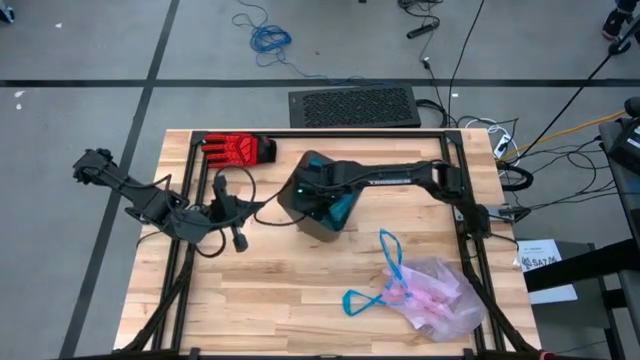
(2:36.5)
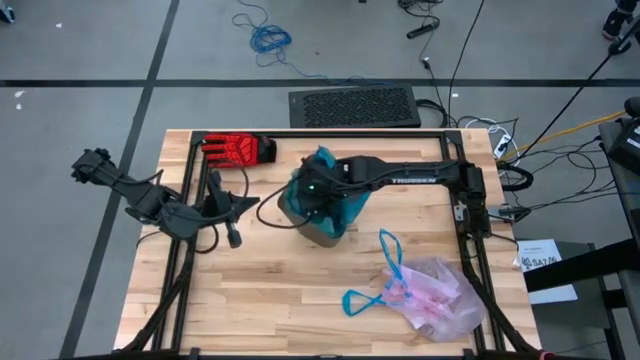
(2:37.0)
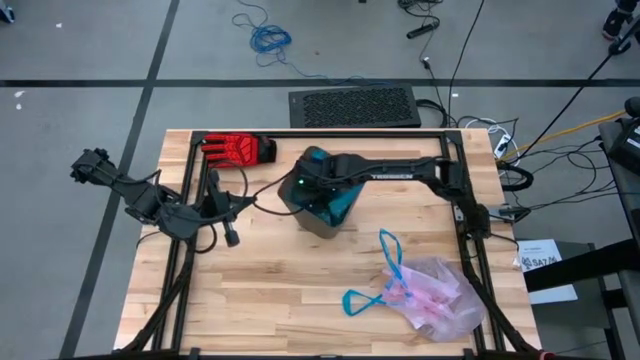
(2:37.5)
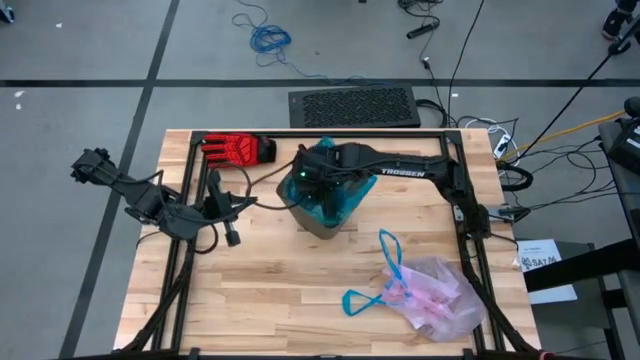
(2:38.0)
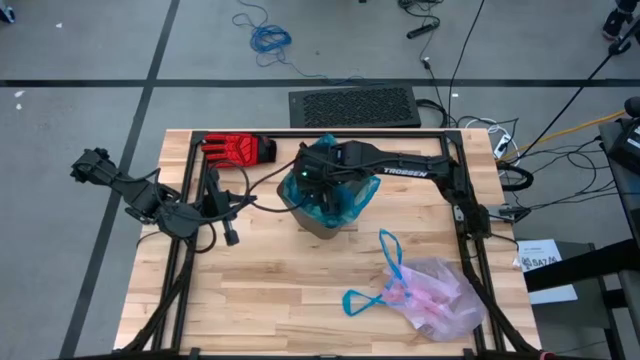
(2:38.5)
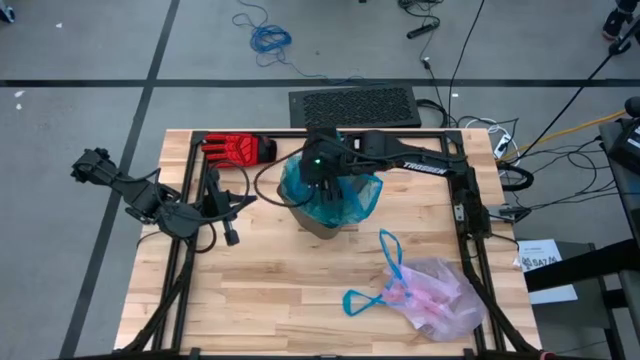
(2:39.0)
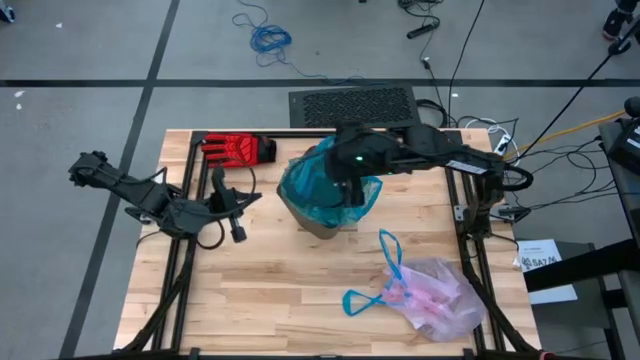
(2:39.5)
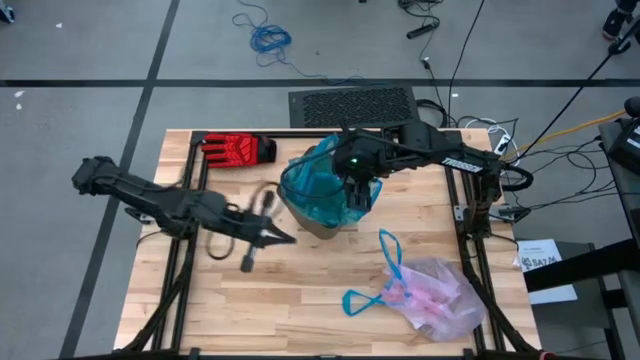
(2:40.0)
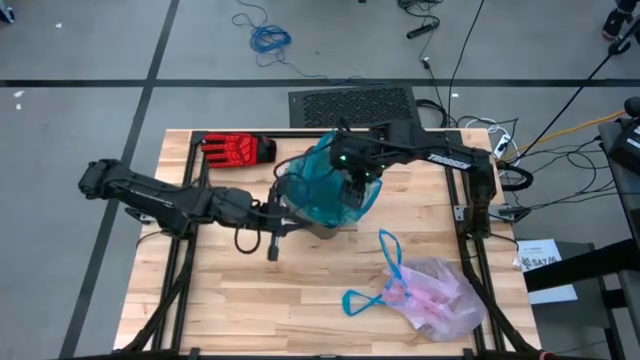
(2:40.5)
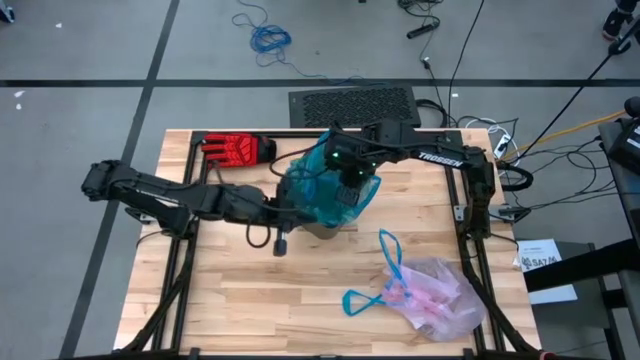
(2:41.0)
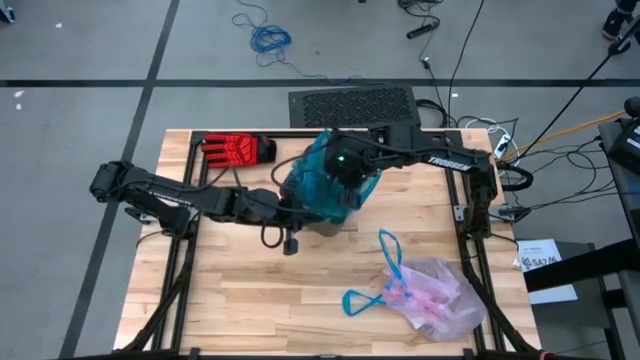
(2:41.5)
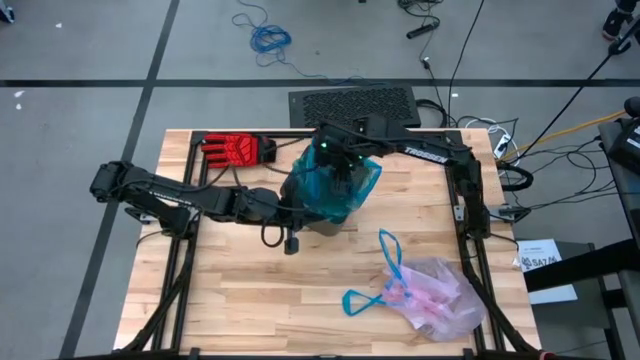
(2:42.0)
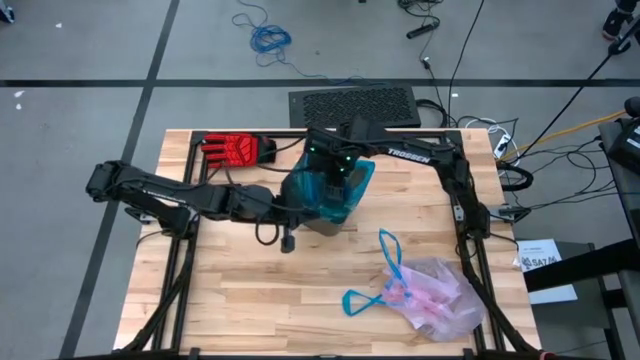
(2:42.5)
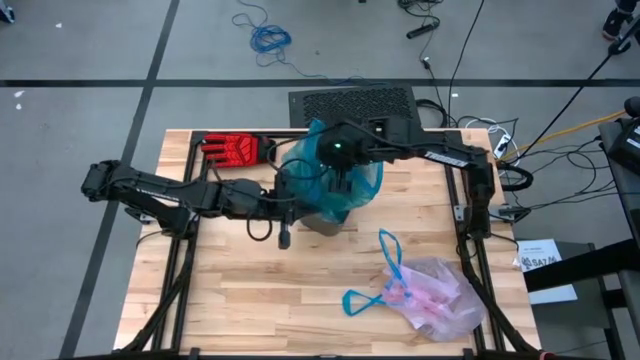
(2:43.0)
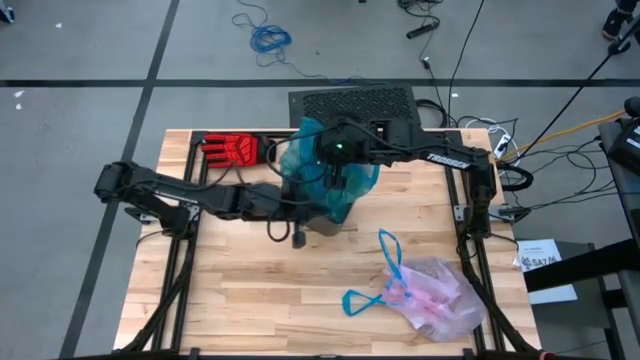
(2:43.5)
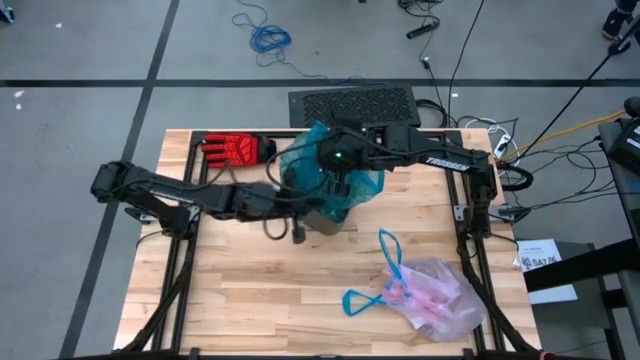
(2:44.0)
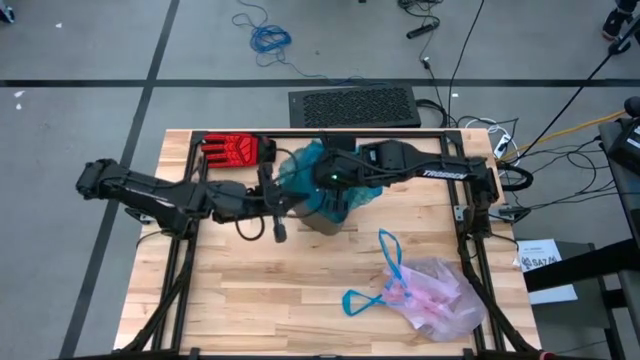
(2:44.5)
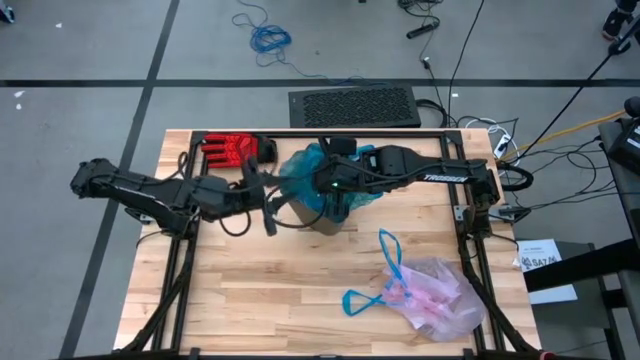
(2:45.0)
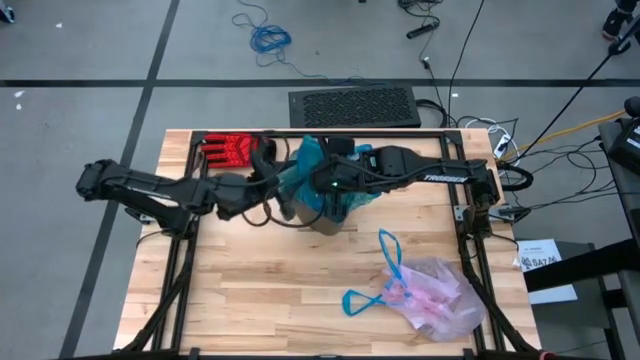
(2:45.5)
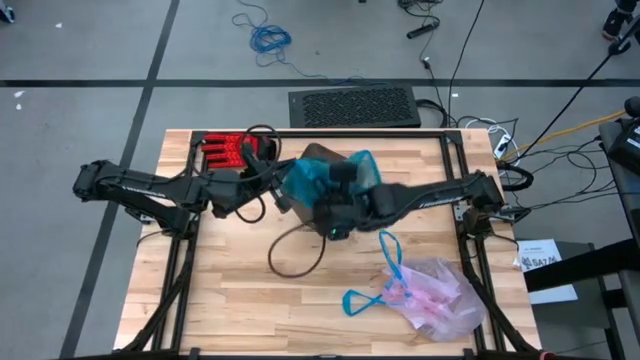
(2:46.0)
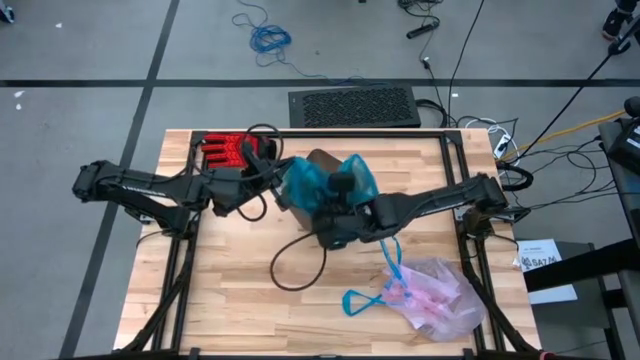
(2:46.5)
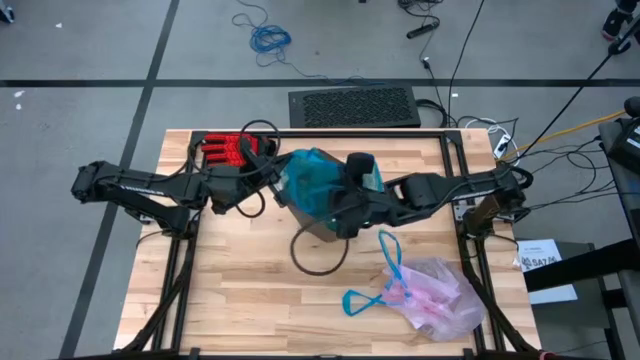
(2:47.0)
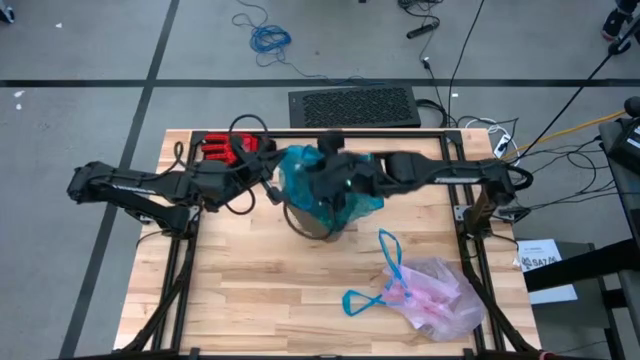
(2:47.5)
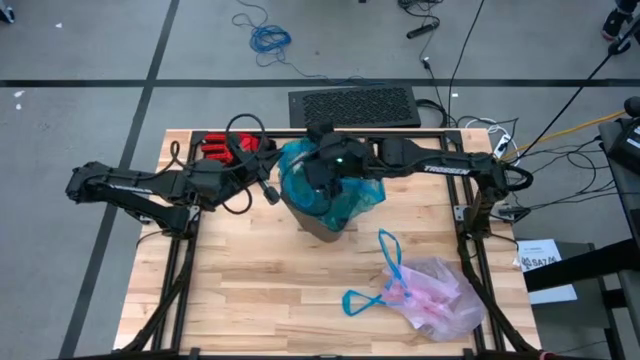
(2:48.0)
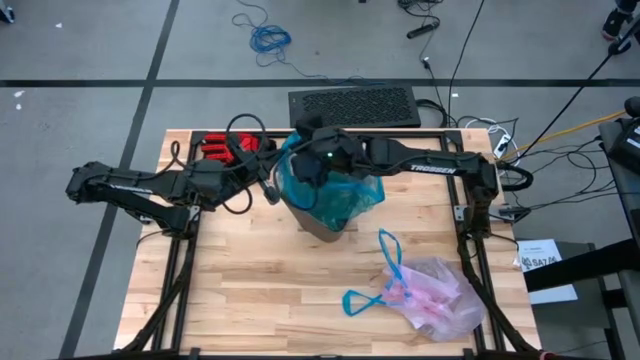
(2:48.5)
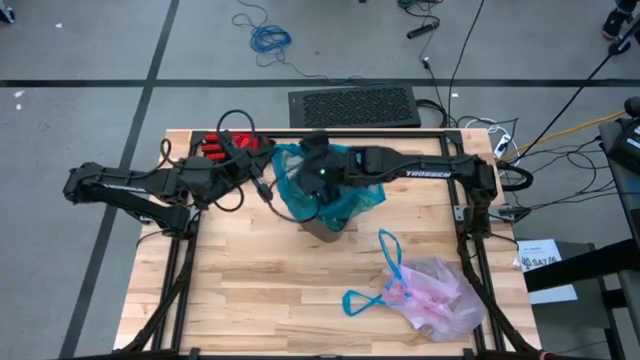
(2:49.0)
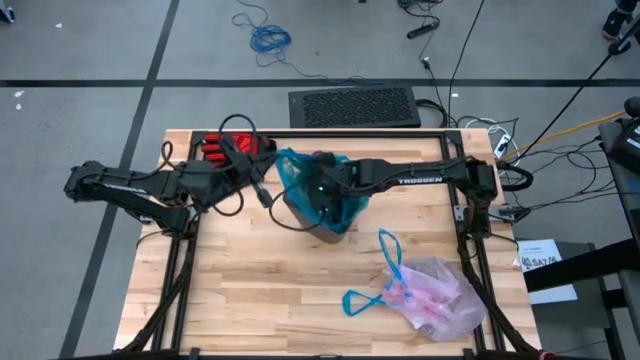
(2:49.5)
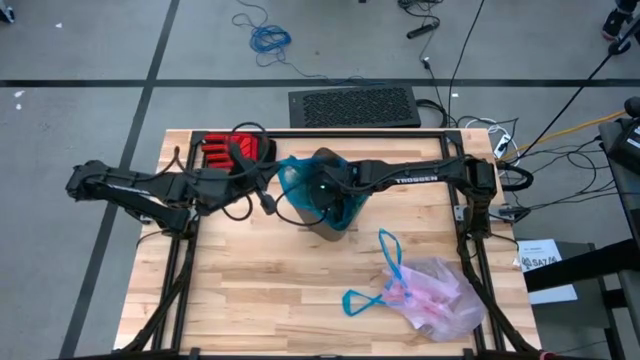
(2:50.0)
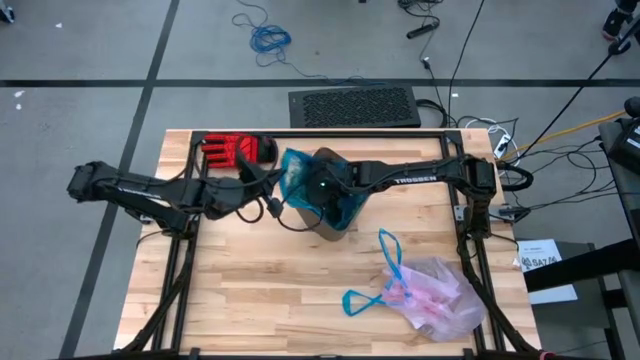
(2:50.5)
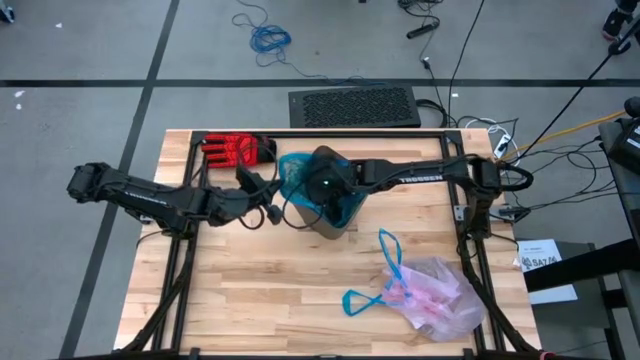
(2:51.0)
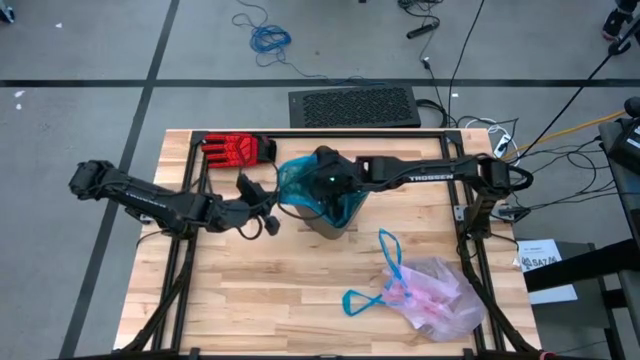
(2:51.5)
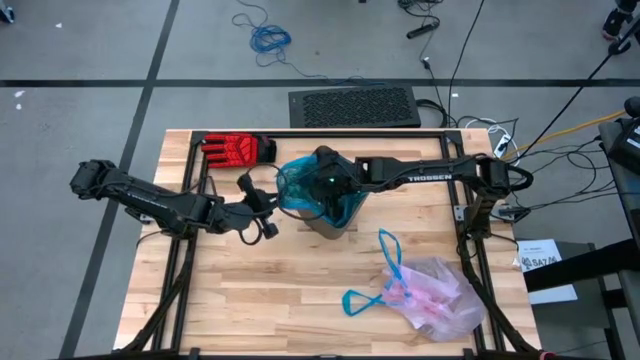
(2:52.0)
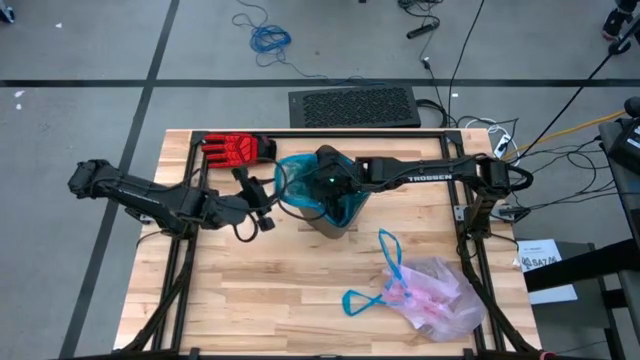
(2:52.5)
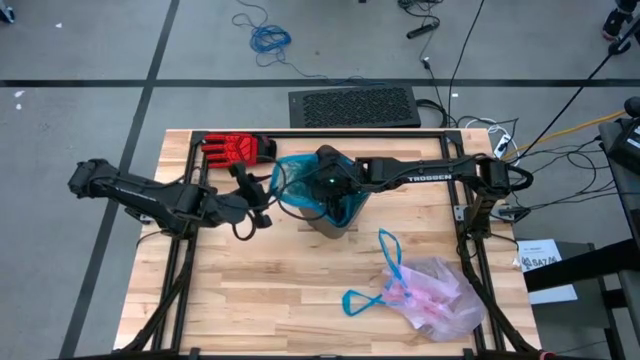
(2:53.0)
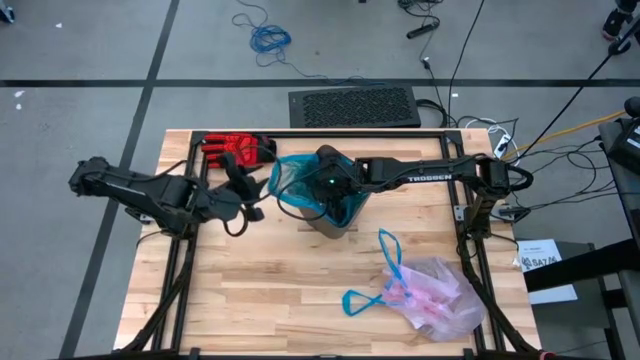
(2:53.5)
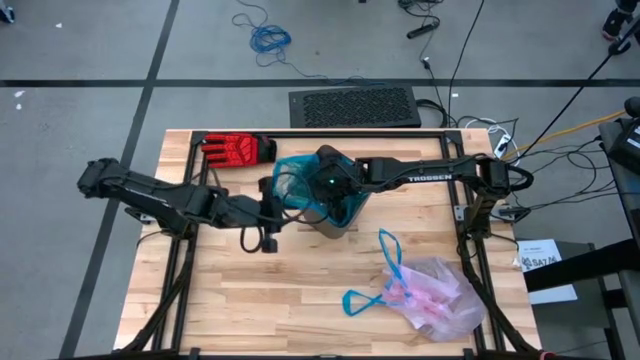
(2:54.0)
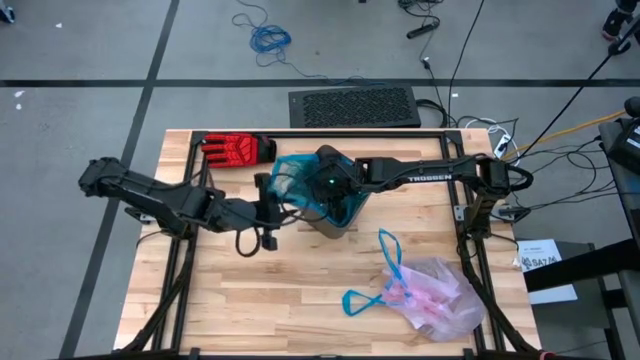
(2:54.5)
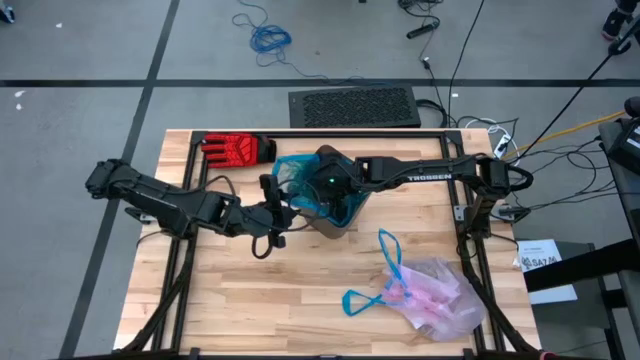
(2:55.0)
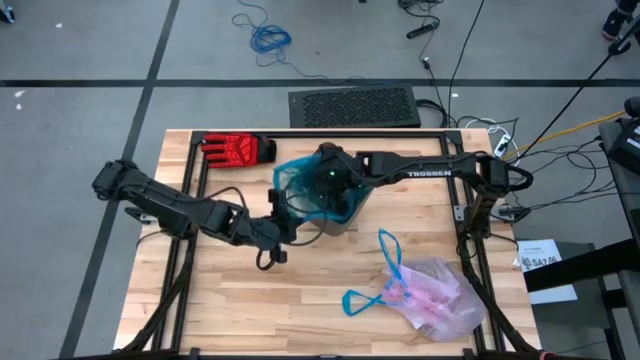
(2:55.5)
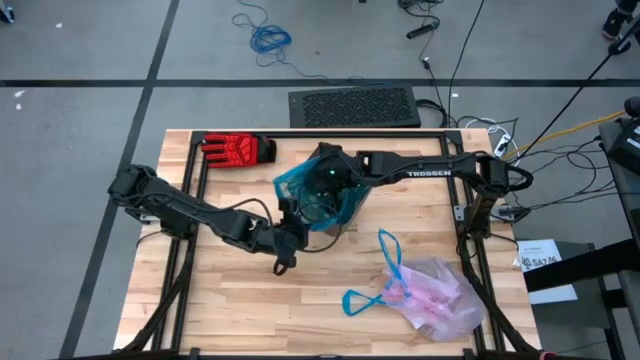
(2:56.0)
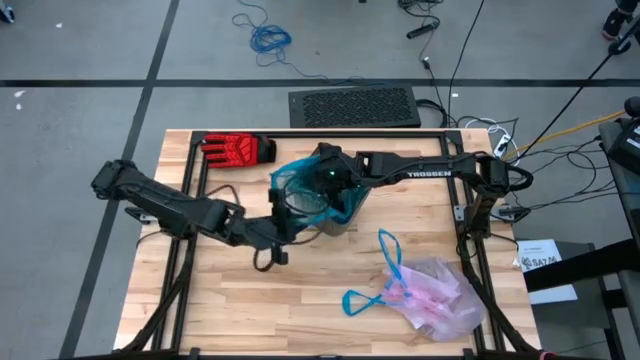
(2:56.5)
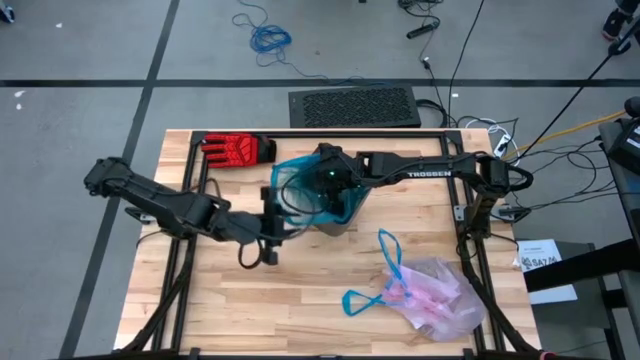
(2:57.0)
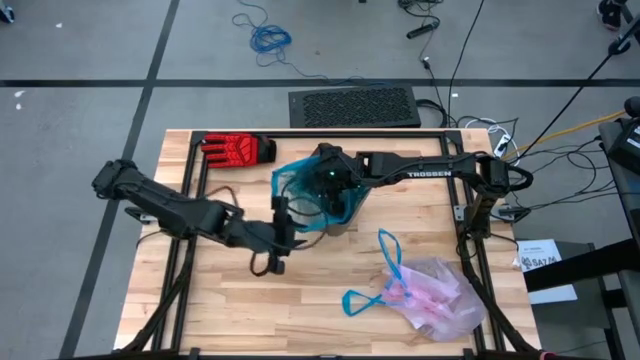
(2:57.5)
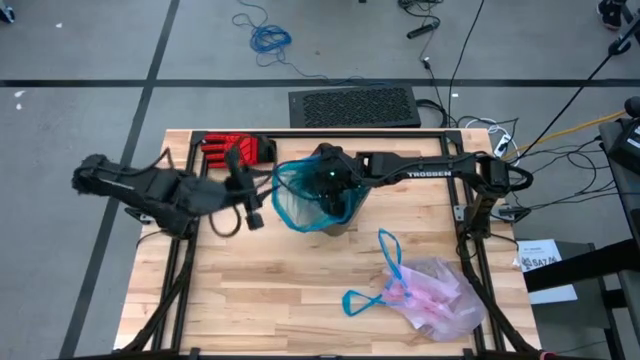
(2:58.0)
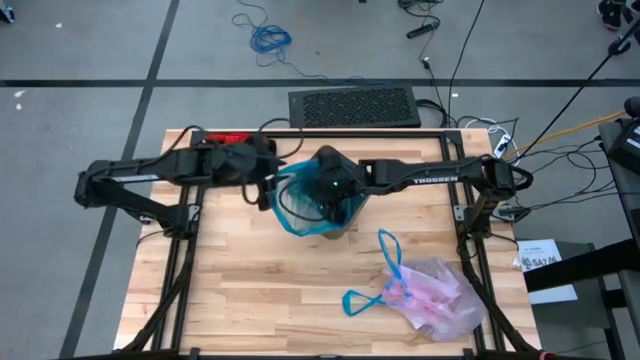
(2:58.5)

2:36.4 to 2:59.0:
Task: place trash/remove bag and relplace
Insert the blue trash bag into the black trash bin
